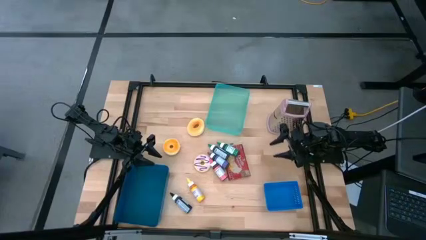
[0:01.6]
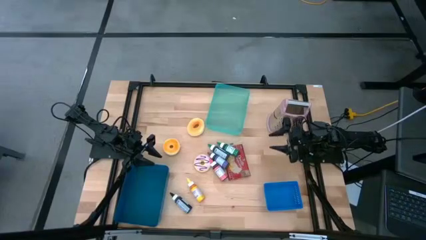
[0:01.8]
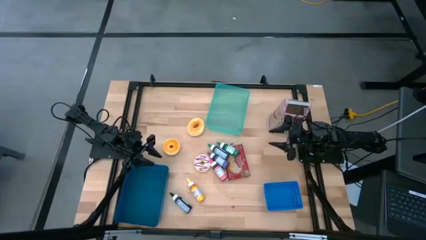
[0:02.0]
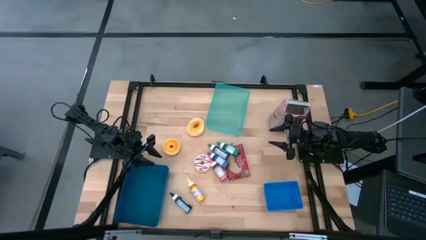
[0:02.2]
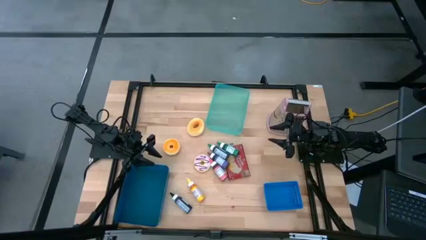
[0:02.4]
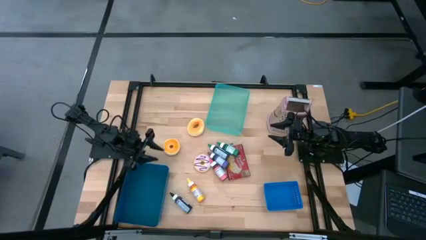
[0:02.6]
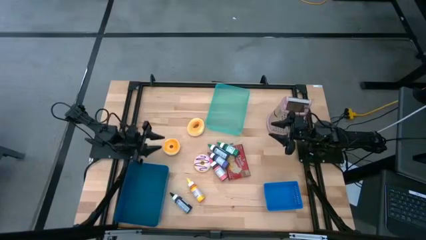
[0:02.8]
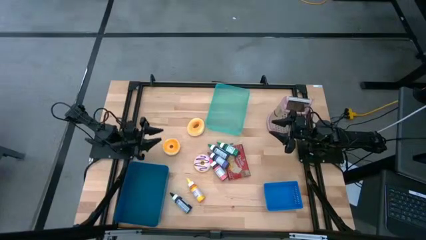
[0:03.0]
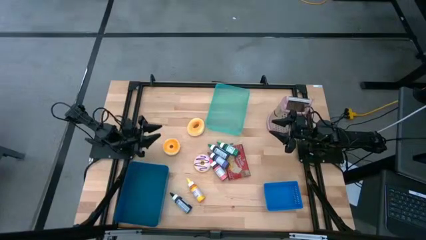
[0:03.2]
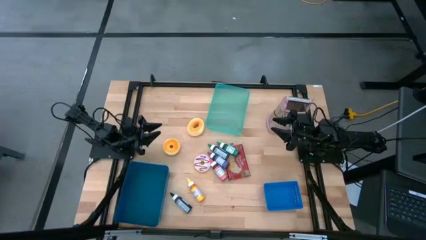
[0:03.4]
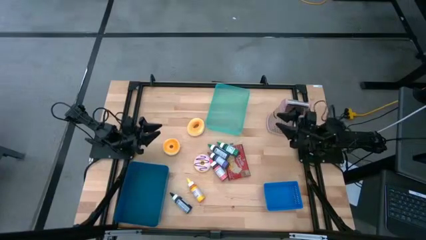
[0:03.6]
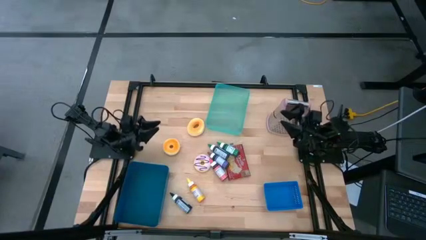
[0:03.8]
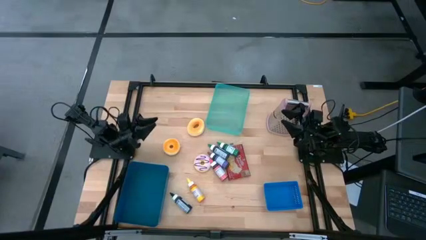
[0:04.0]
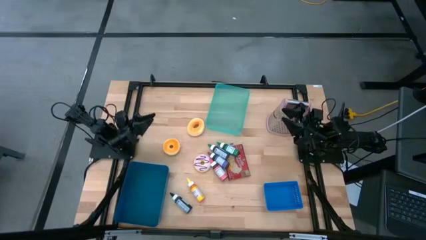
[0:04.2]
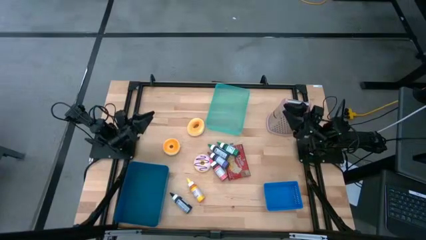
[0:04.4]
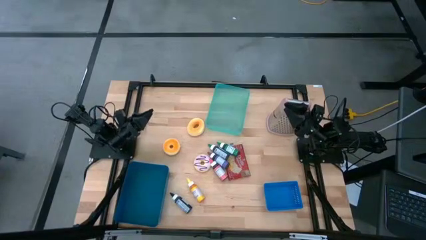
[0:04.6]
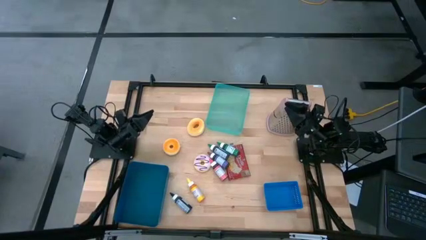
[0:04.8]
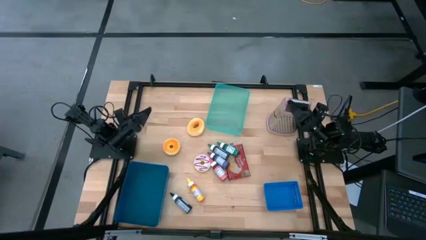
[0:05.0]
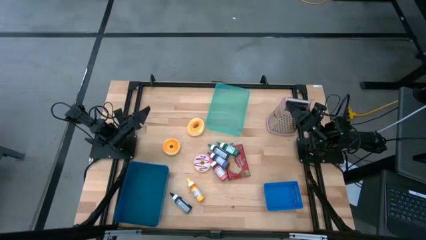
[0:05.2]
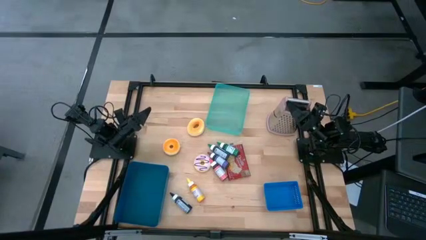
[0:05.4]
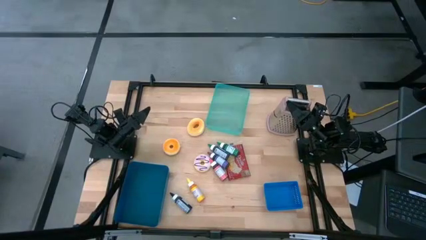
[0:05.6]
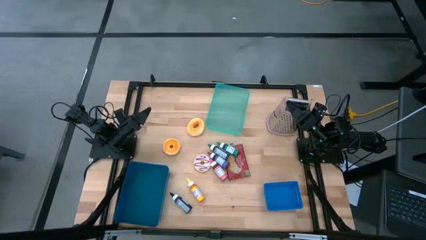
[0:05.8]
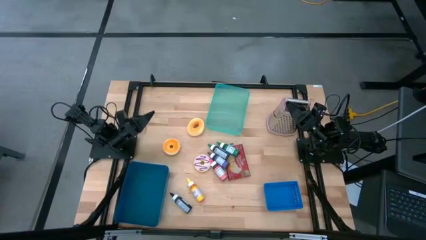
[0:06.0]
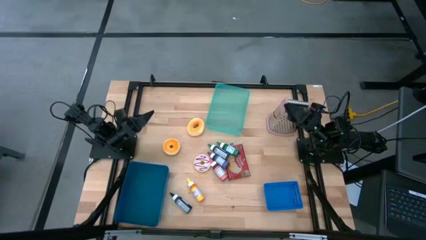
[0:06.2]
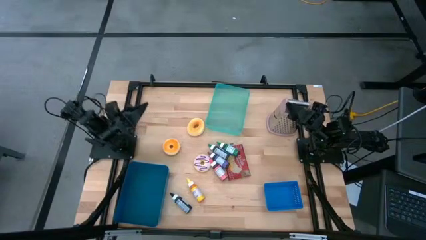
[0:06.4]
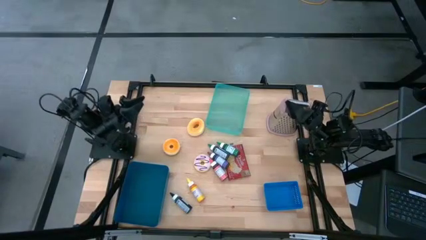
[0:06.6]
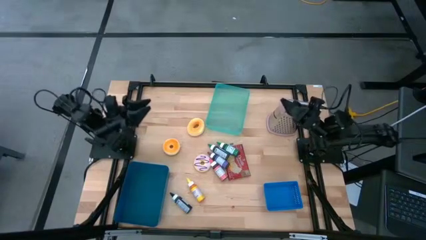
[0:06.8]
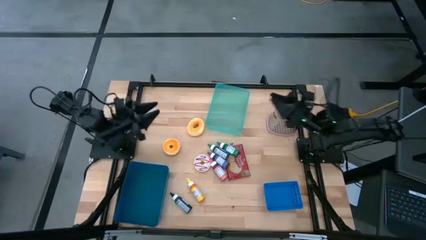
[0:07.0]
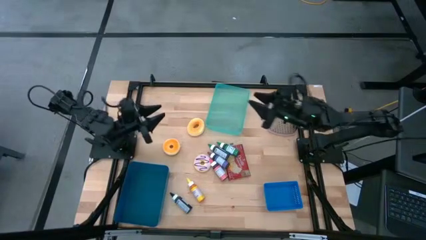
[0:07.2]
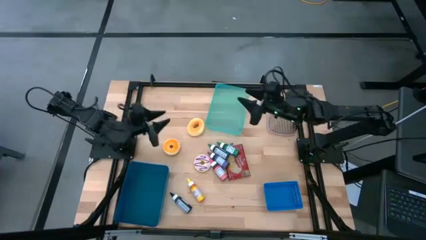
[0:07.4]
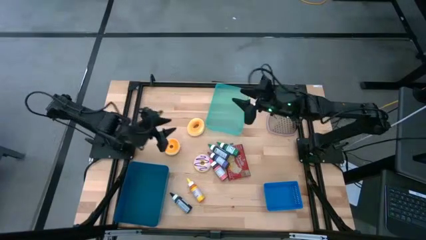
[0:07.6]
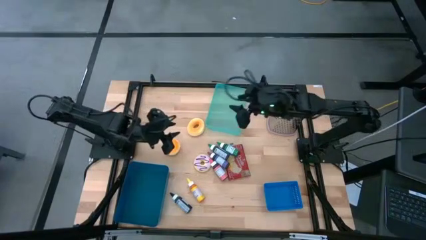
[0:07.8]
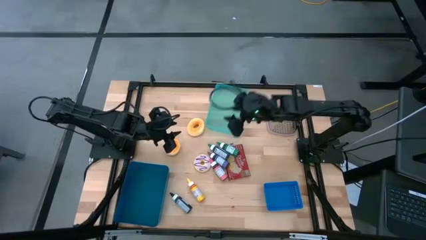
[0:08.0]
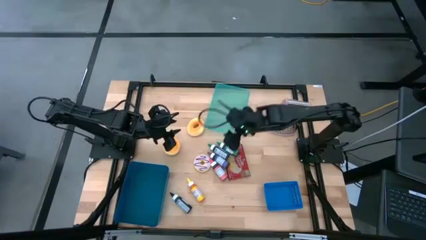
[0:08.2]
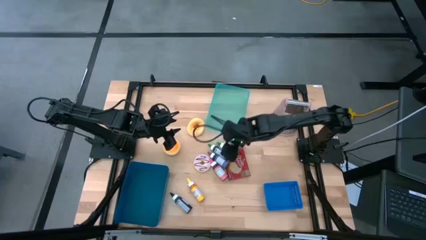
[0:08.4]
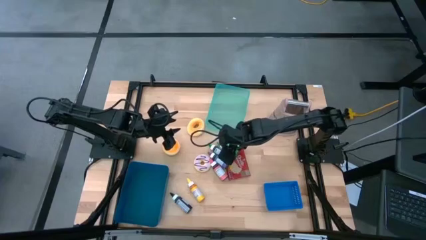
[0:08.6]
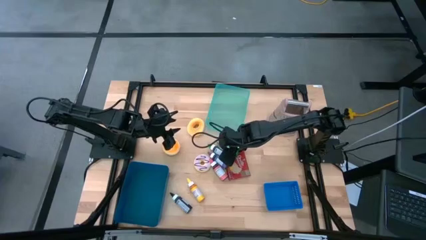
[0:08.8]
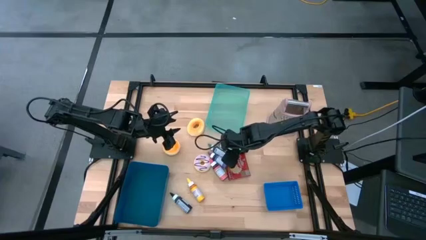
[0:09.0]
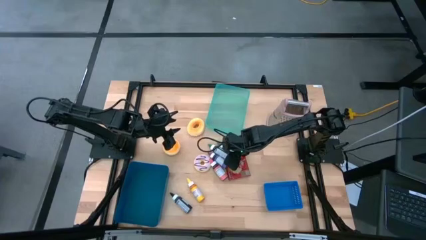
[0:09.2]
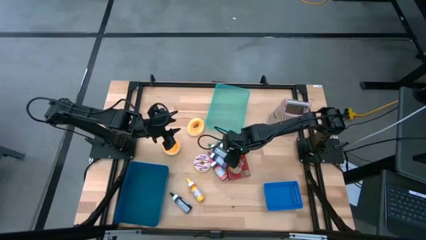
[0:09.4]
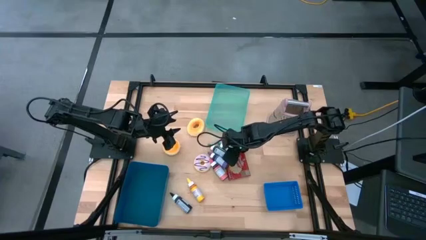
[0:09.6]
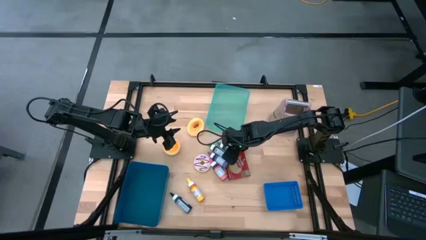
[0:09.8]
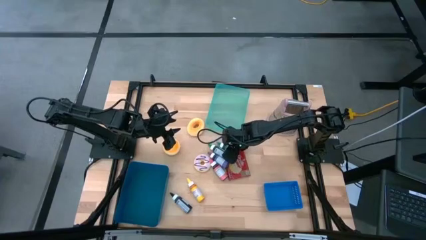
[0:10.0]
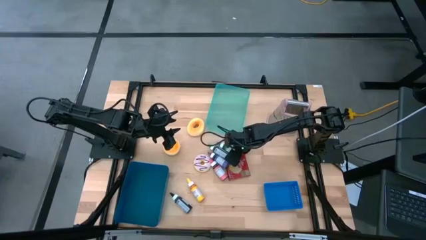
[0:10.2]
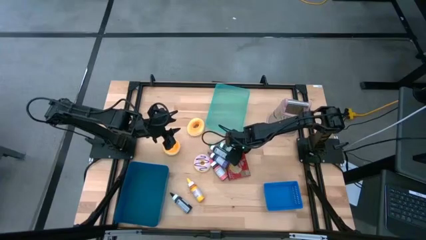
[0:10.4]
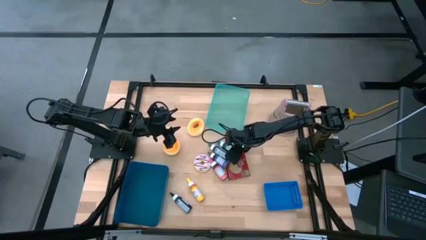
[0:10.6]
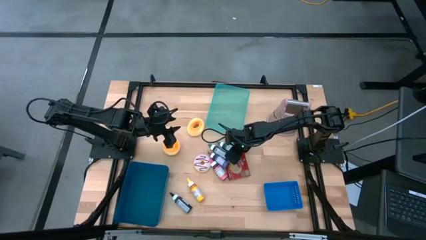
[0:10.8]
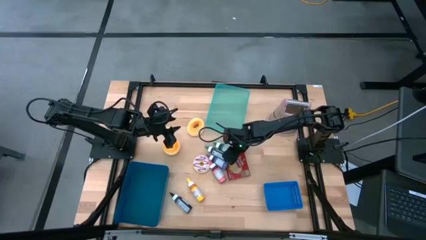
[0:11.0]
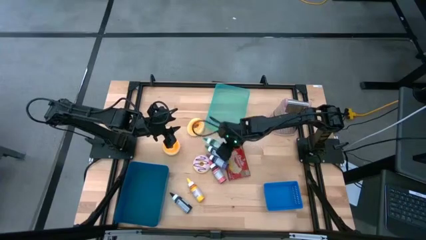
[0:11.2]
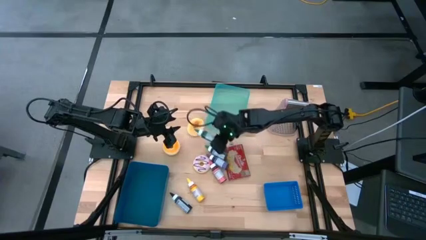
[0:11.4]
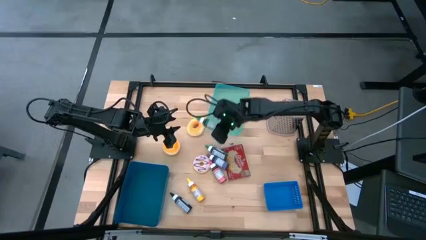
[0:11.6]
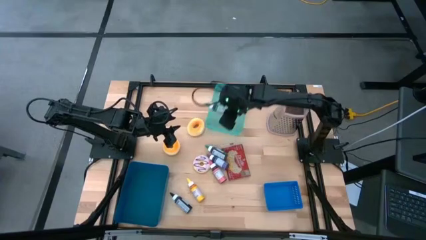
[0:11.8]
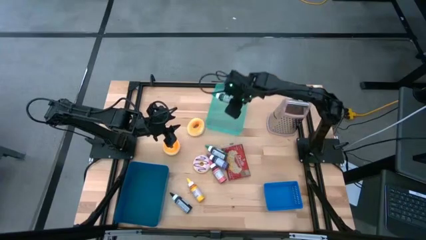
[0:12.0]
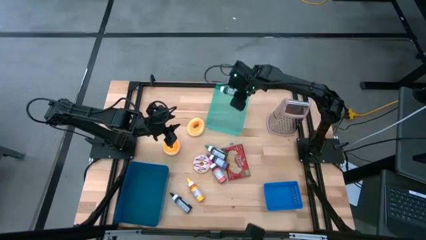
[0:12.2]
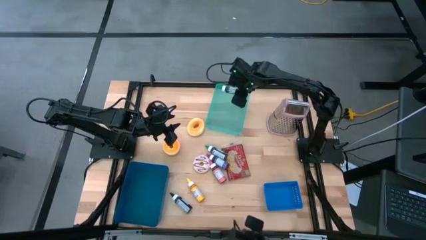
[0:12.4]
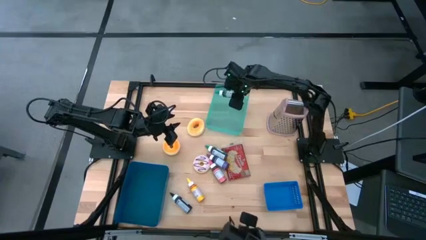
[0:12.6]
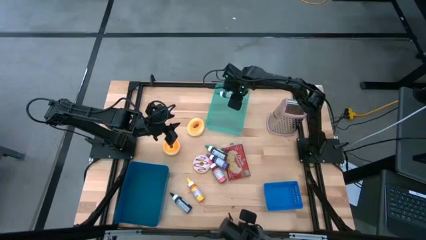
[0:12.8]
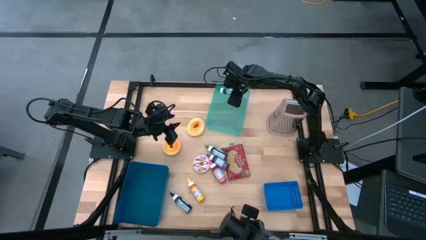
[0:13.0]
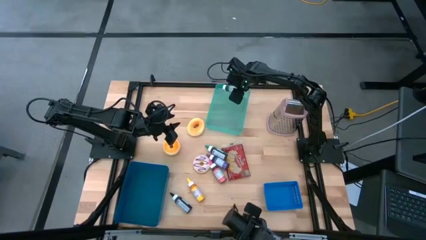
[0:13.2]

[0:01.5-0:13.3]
Put the top green food coloring into the green bin

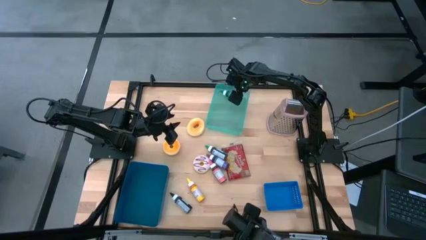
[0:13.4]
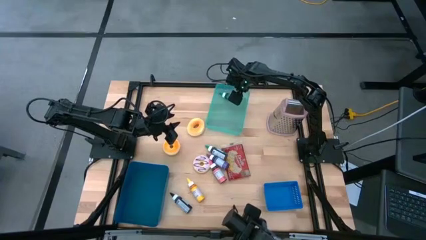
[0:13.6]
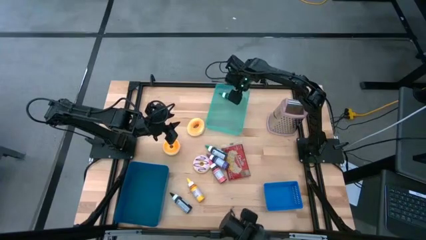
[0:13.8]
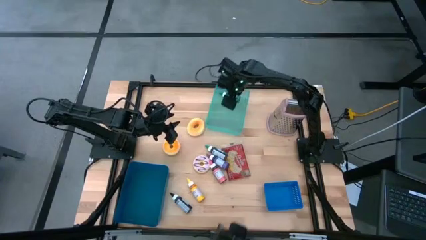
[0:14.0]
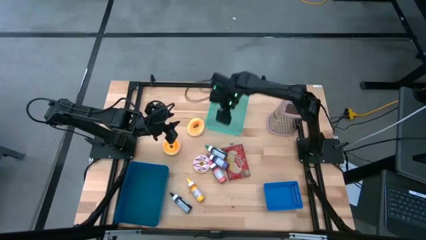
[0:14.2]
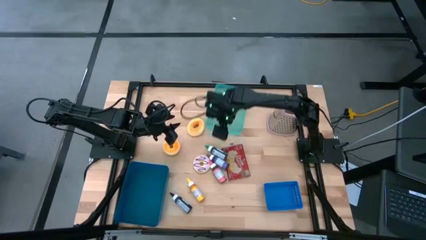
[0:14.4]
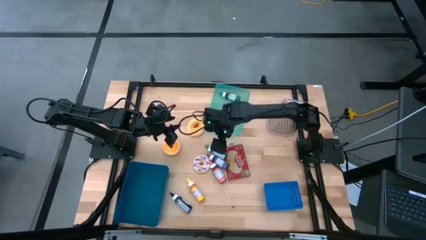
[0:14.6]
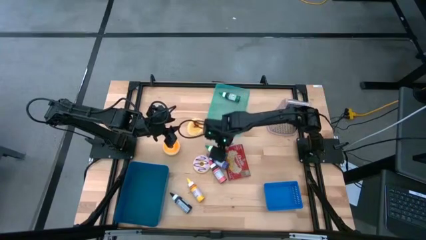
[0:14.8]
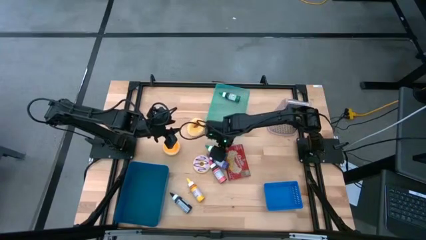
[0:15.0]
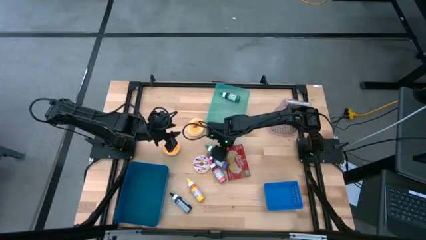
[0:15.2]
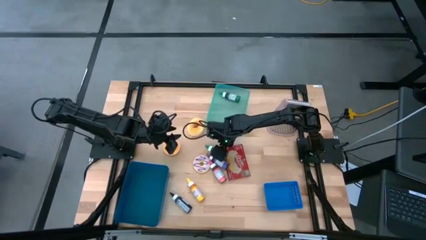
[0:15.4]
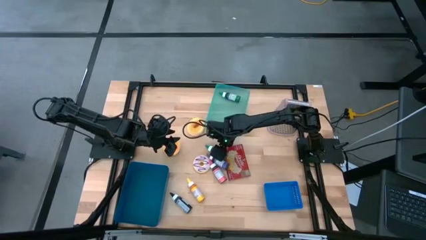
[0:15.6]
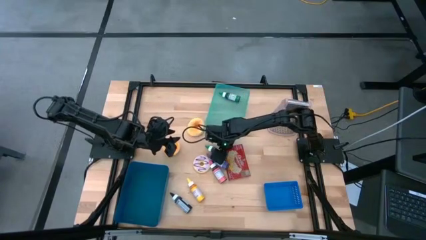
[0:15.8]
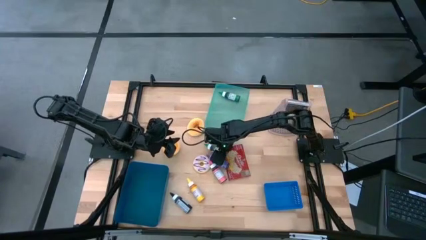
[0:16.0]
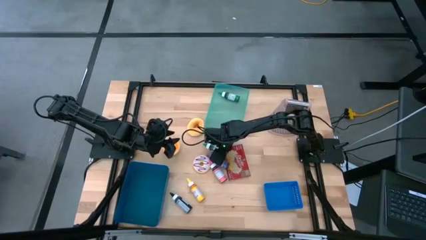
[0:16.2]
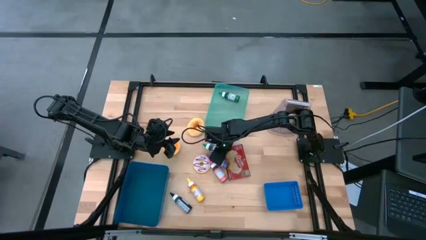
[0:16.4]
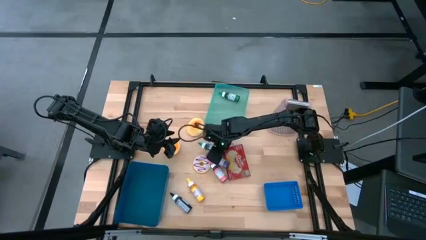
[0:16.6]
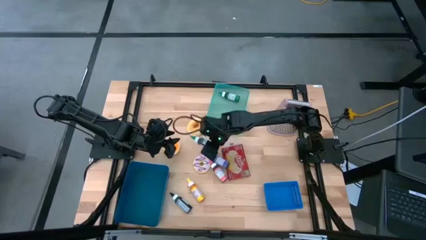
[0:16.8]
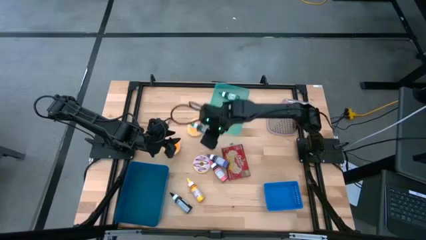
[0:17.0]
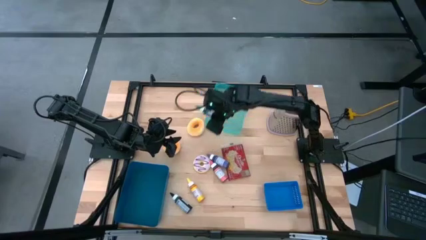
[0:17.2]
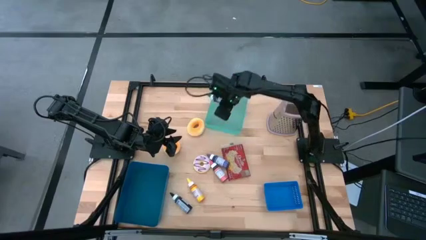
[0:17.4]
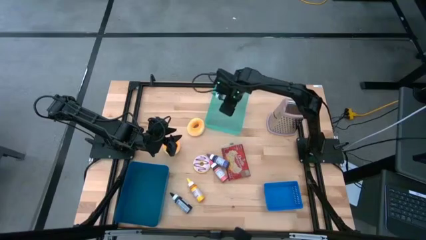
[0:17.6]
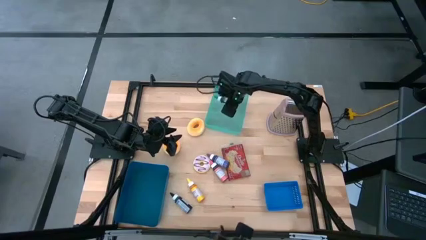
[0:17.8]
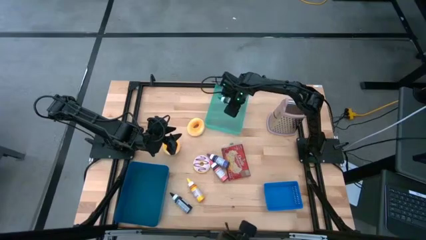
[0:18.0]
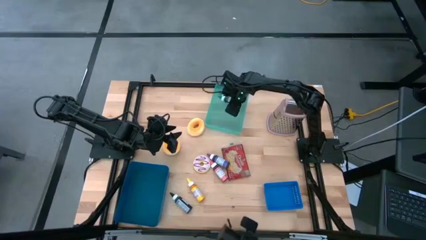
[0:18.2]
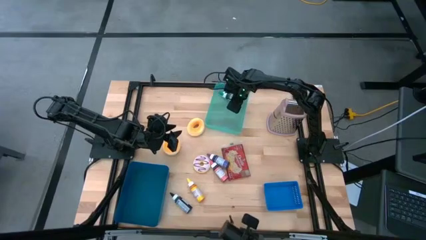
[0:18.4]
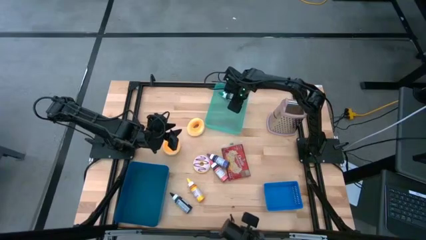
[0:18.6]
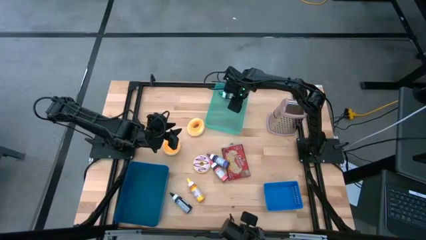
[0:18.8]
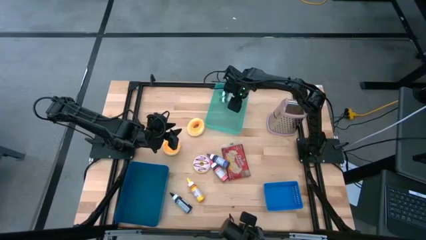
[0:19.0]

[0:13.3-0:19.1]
Put the green food coloring into the green bin
